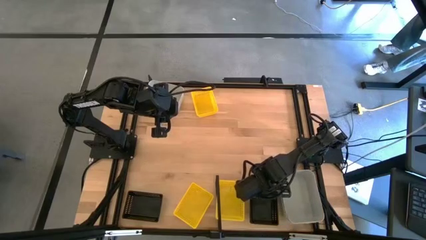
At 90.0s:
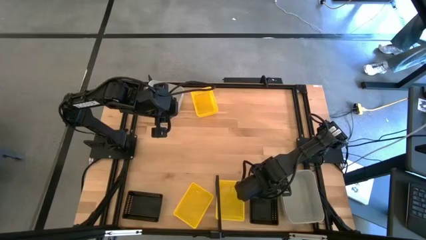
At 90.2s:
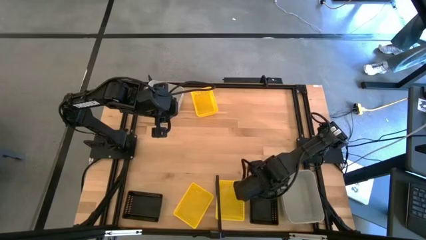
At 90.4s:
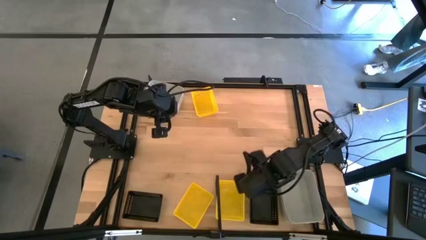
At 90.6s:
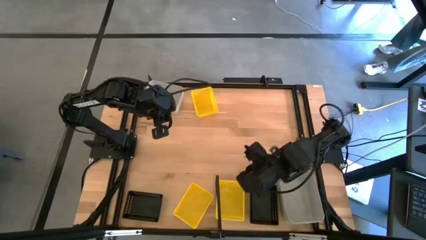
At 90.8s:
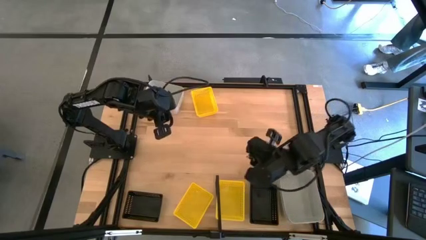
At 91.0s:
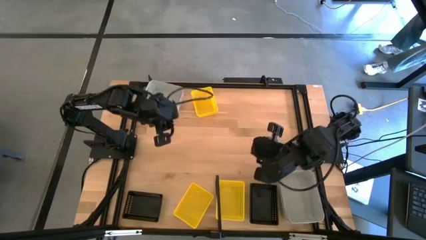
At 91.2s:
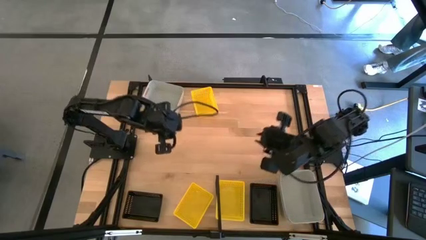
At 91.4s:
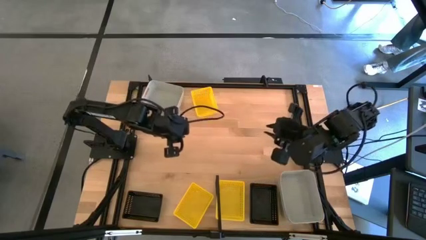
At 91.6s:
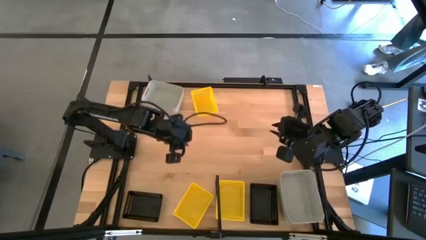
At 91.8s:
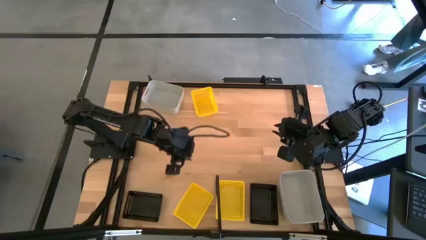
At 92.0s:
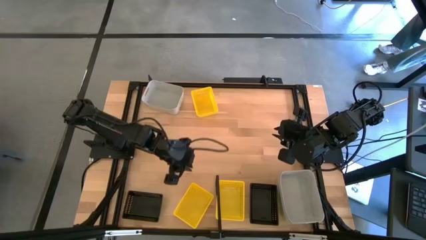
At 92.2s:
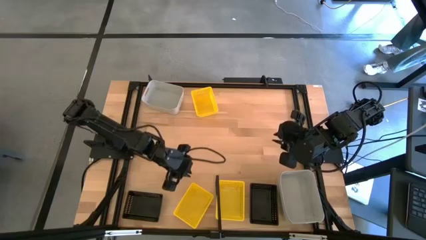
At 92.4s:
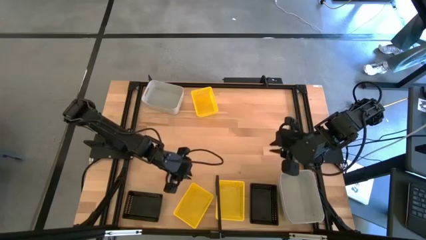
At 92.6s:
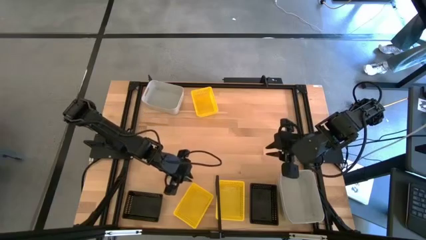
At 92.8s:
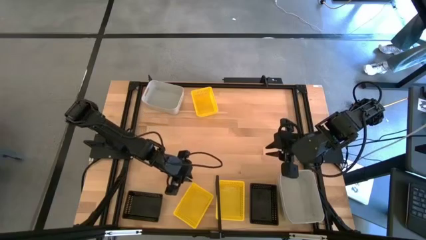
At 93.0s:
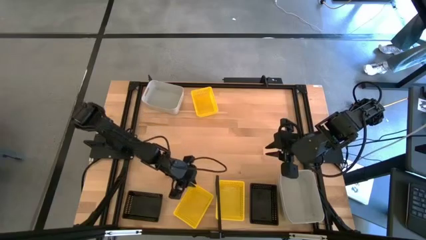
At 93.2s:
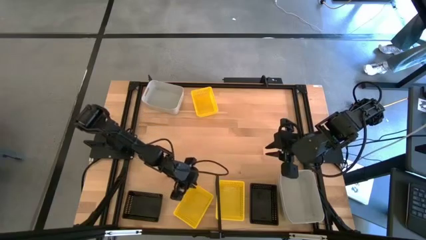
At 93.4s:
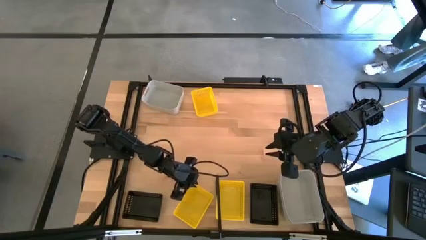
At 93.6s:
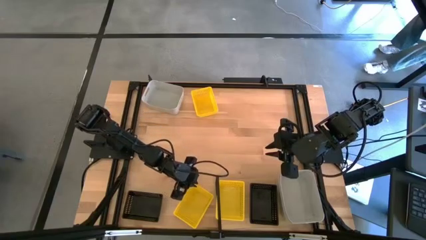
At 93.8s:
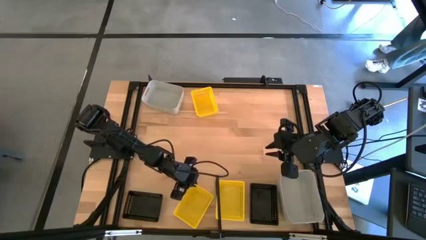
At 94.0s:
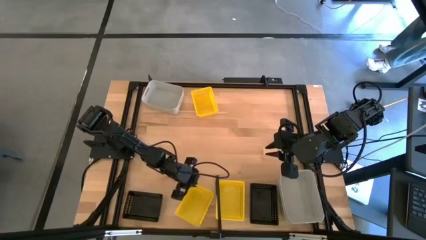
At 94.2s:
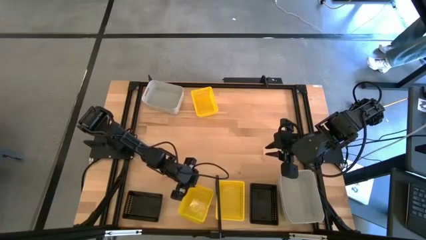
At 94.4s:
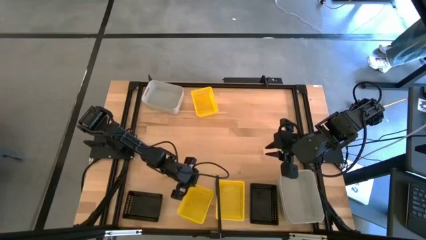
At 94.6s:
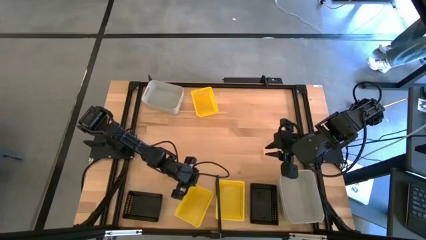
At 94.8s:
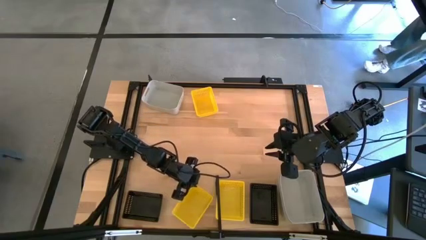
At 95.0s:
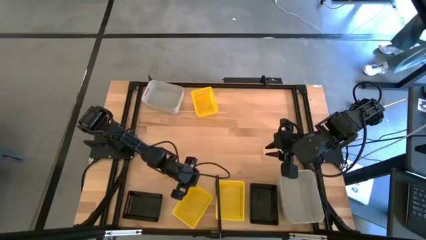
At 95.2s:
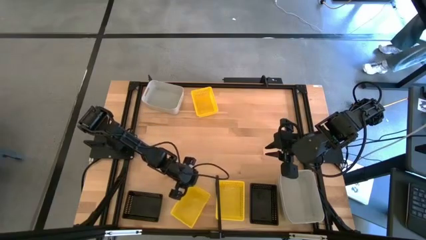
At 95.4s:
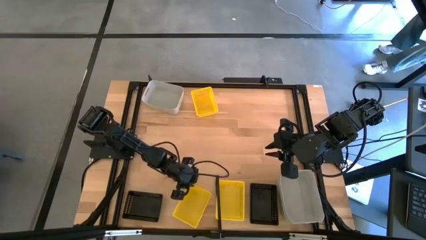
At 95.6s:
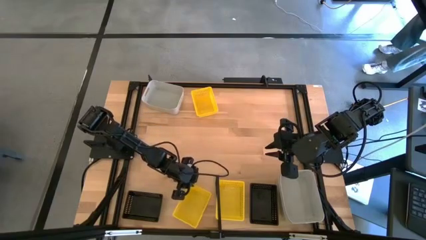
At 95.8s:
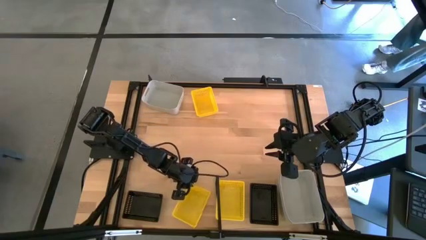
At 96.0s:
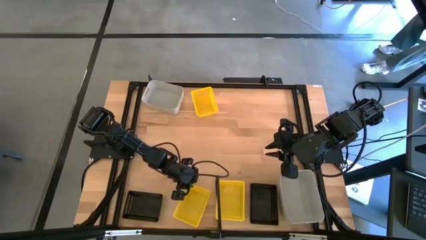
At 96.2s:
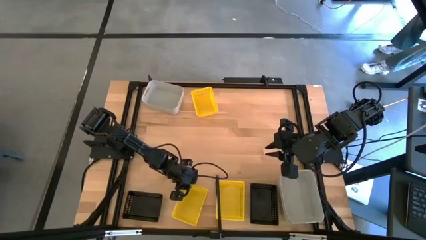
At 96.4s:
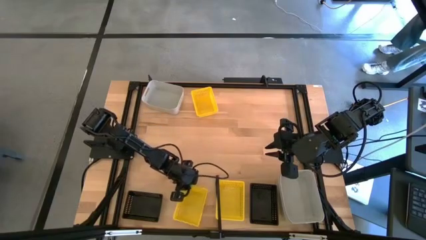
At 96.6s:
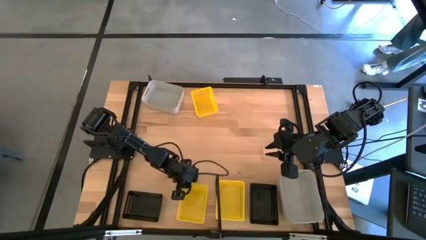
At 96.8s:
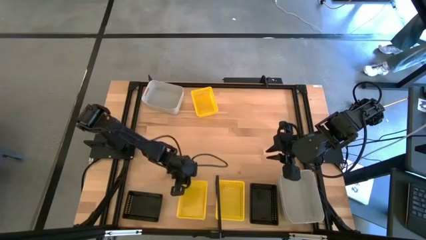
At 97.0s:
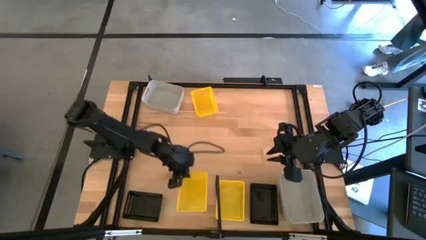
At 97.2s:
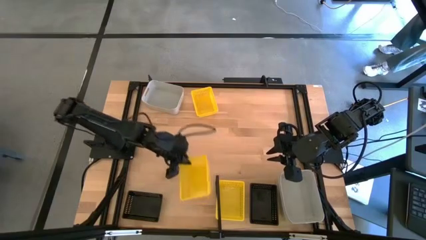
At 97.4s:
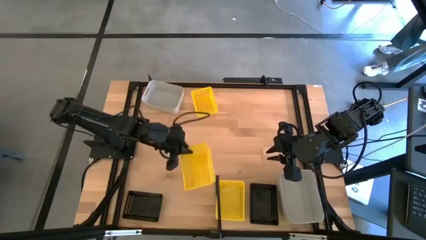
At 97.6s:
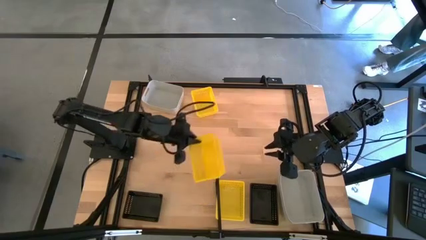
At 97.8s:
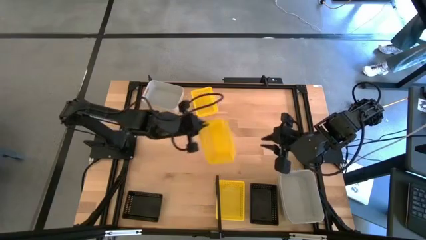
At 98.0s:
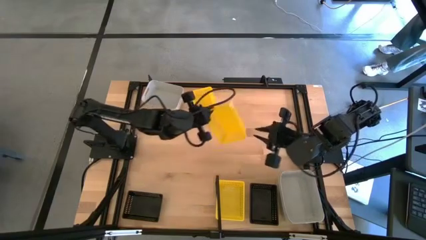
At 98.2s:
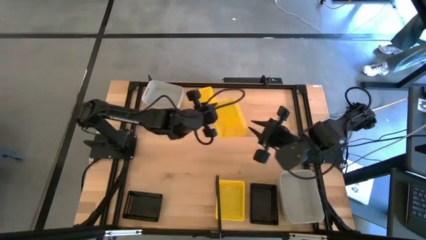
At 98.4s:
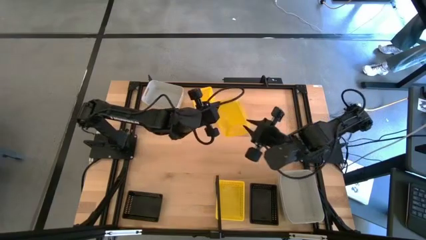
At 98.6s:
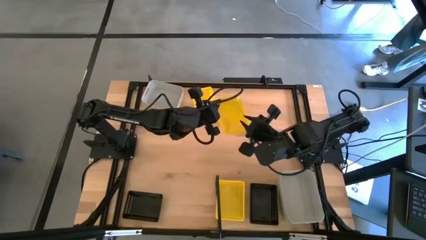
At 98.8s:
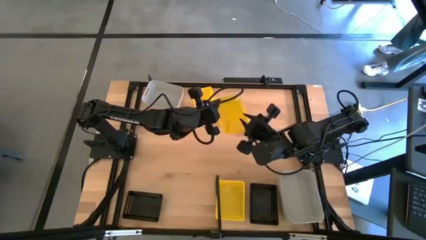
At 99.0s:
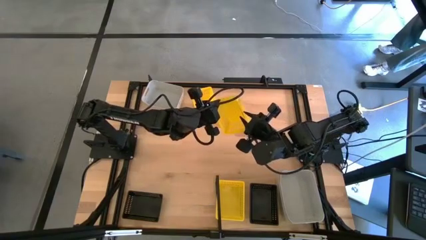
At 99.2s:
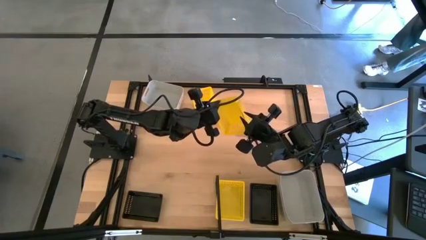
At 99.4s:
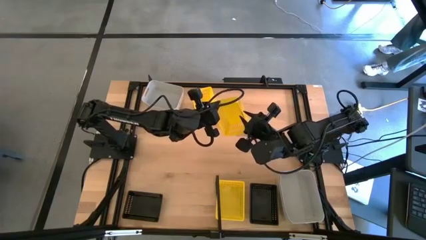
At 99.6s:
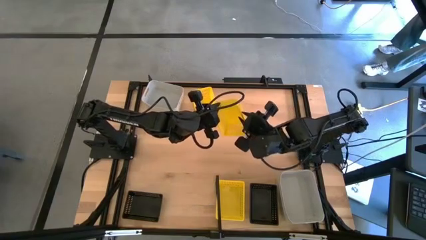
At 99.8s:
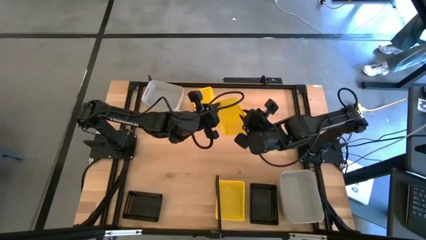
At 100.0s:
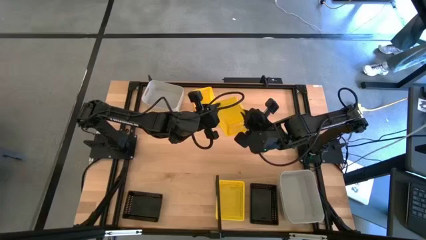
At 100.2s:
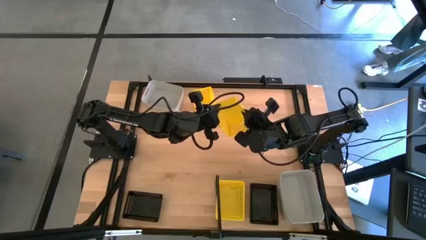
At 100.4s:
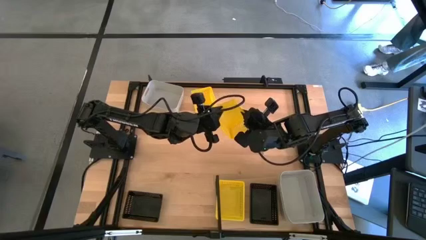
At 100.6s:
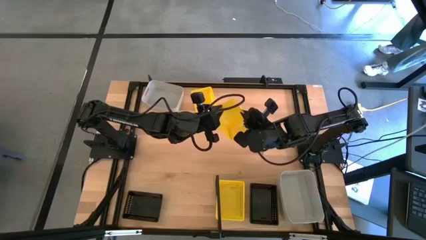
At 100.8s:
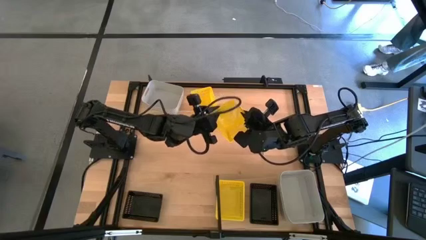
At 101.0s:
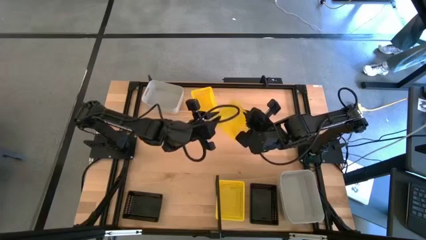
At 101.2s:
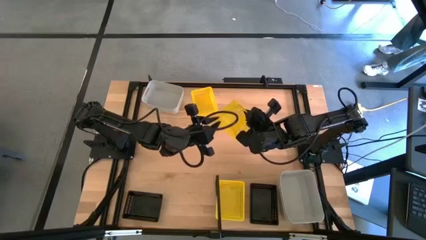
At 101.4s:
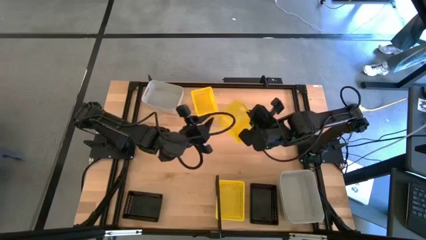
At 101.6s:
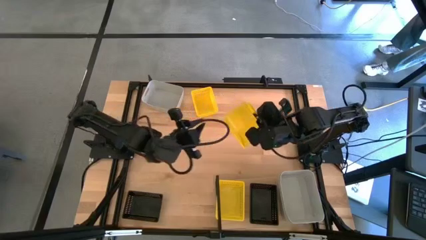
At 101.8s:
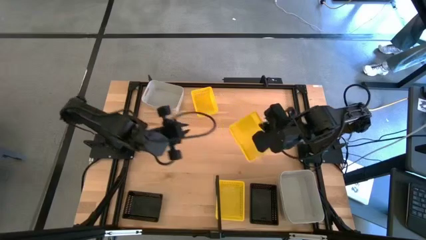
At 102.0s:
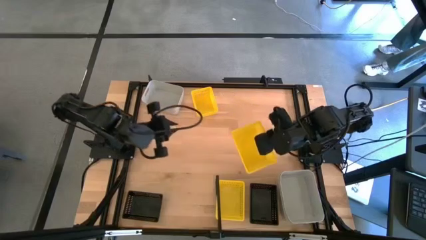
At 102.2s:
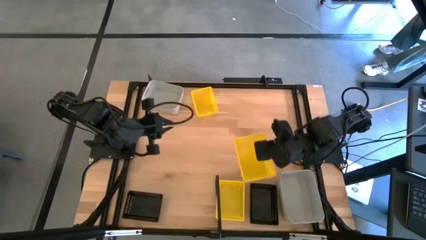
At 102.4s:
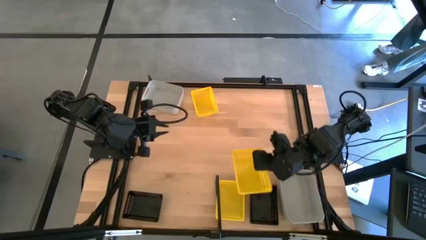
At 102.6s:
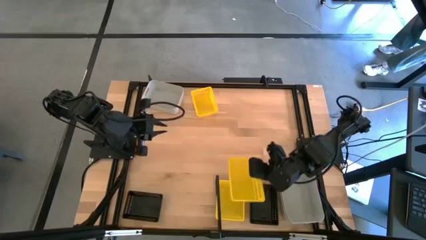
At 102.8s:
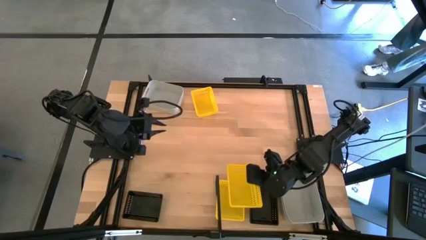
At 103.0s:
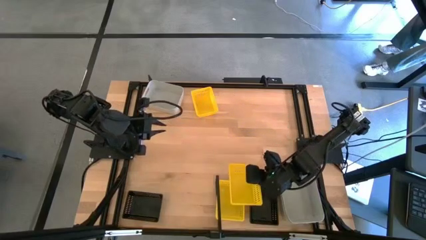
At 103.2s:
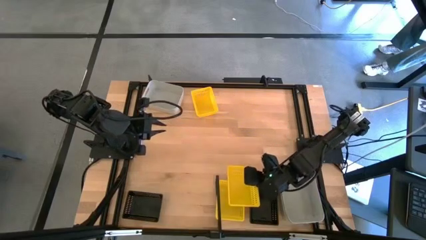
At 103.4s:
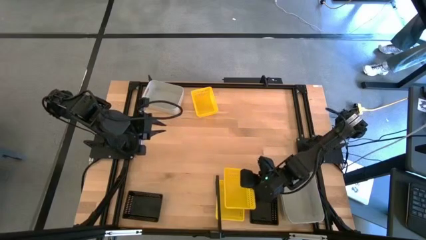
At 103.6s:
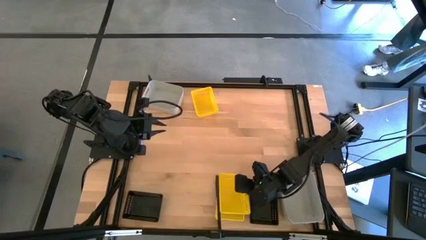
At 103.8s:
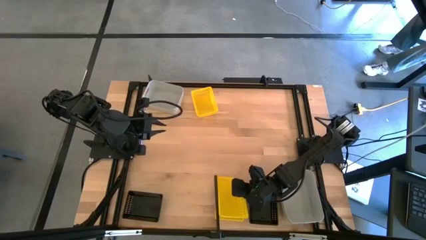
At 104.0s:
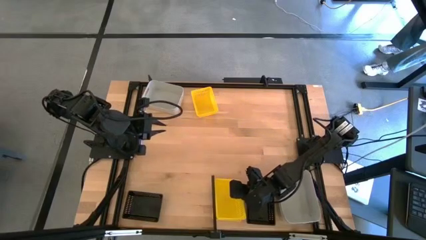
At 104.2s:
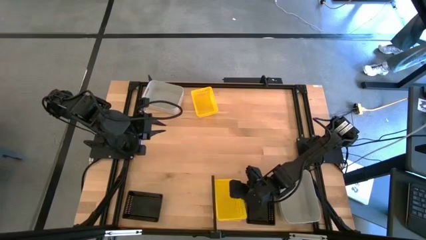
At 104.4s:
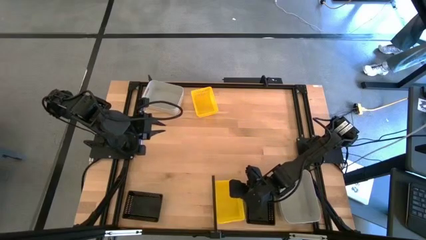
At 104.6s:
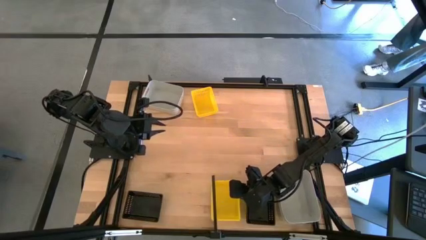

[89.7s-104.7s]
Task: Stack baskets on shelf by color
Stack the bottom yellow bin on top of the yellow bin on the shelf

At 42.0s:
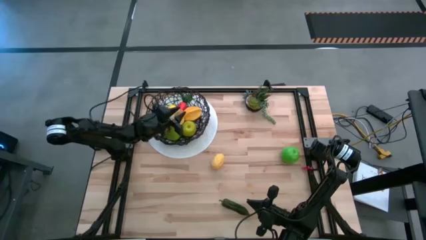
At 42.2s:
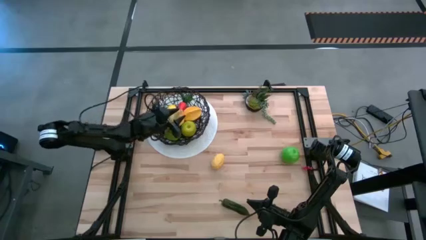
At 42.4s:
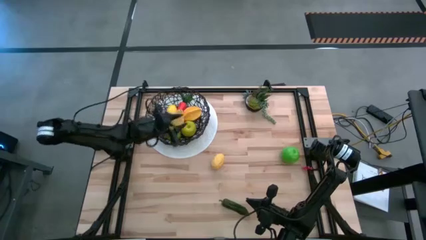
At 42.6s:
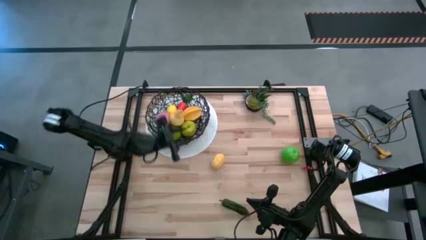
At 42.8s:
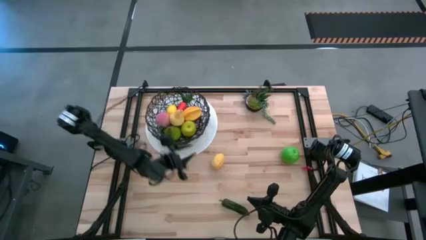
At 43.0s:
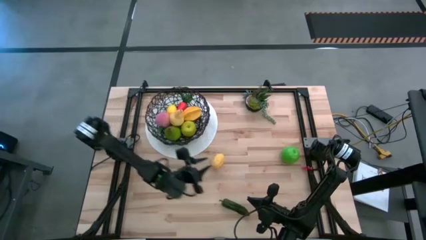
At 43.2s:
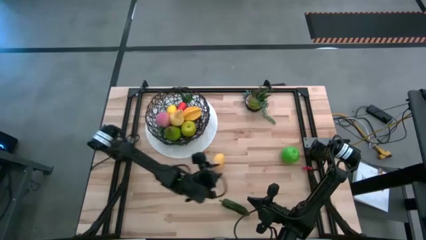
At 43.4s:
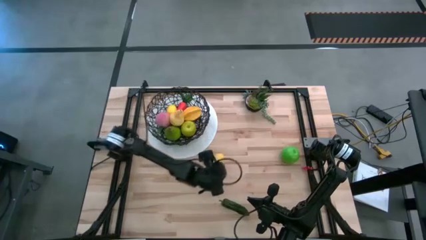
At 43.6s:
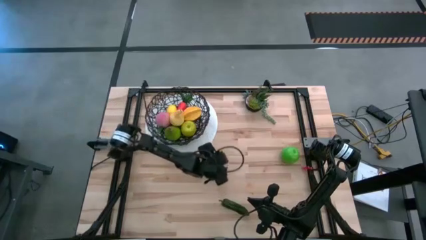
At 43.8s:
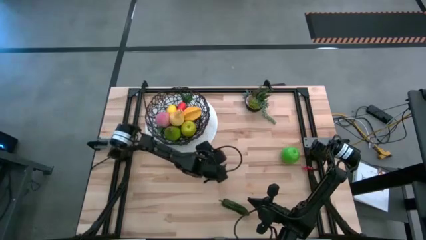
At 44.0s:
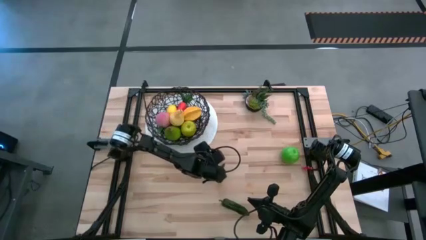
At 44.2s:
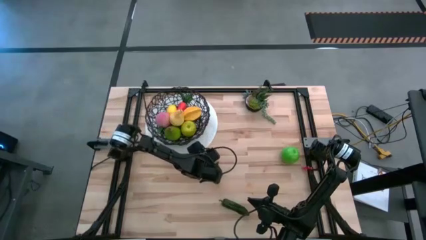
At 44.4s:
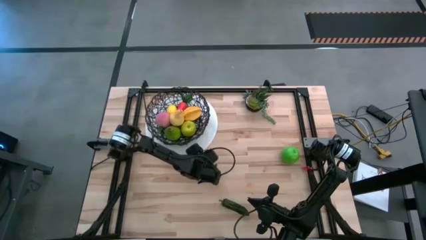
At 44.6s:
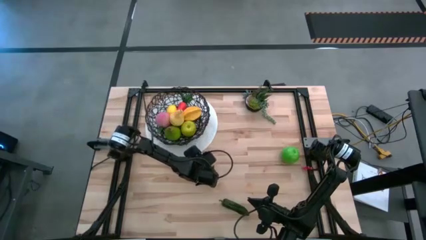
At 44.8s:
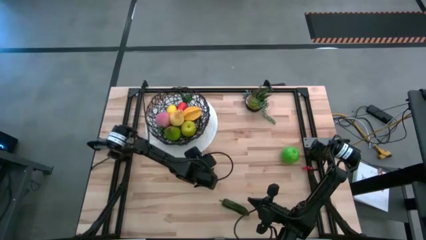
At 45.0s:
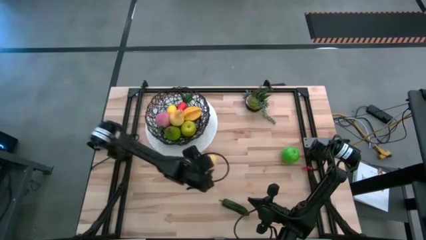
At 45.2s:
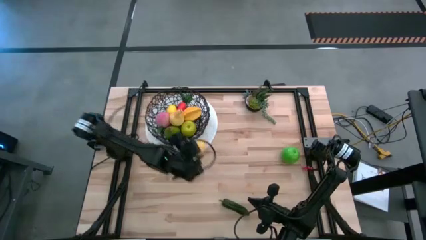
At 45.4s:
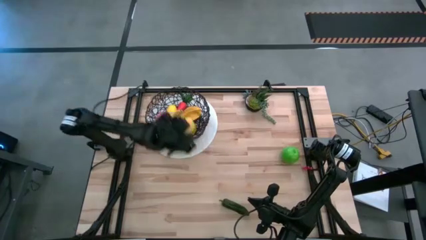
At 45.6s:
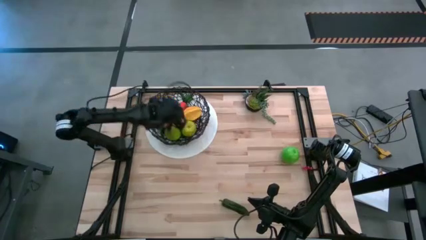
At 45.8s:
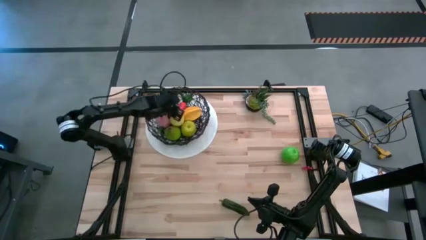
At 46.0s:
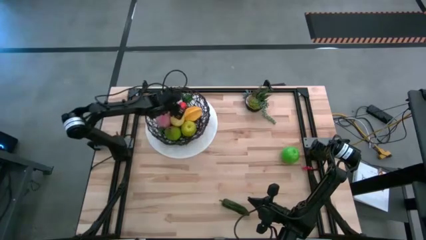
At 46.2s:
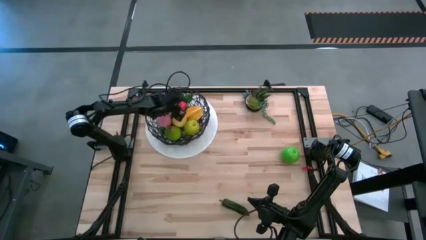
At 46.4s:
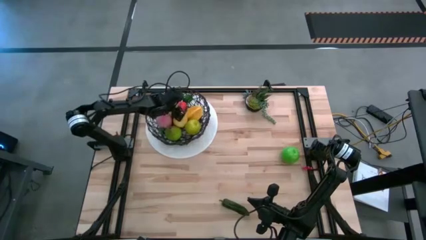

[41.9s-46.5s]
Task: Build produce basket
Put the yellow lemon into the wire basket
